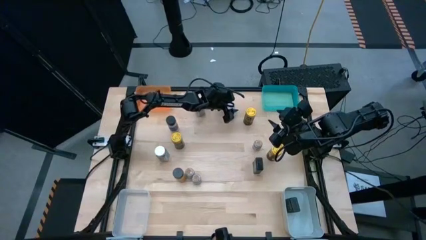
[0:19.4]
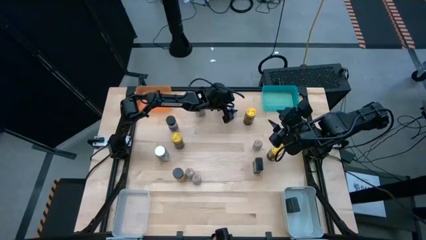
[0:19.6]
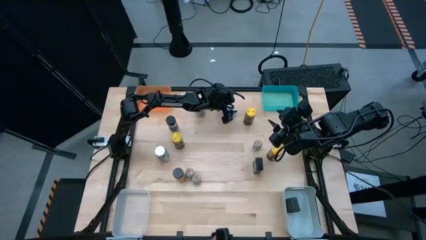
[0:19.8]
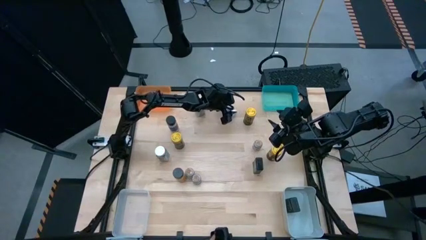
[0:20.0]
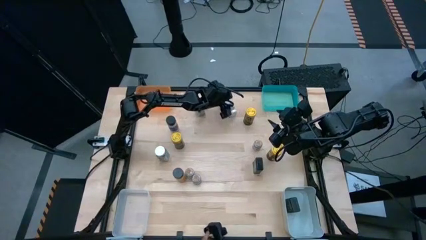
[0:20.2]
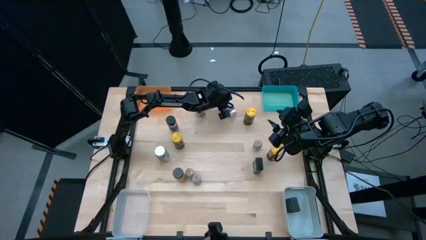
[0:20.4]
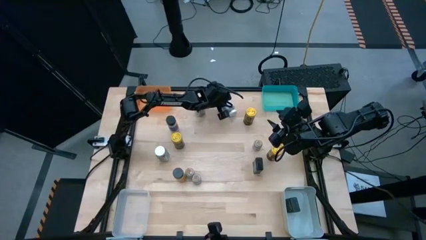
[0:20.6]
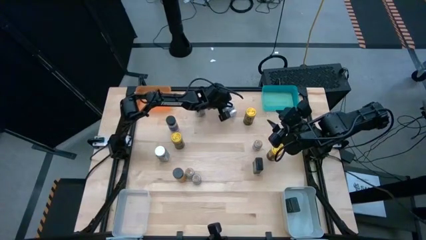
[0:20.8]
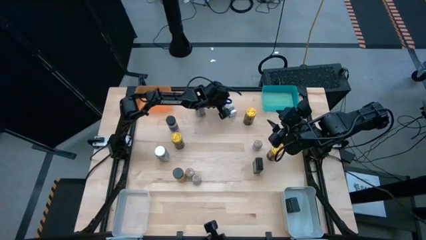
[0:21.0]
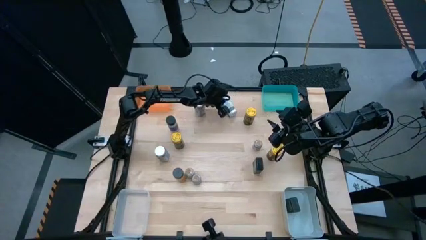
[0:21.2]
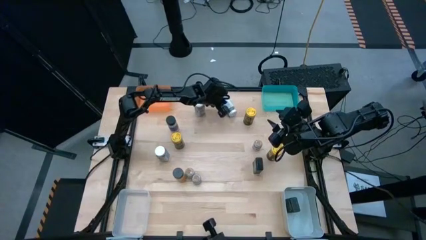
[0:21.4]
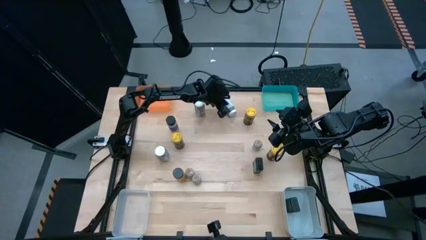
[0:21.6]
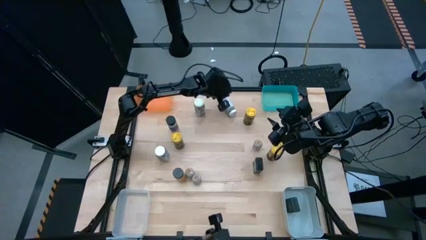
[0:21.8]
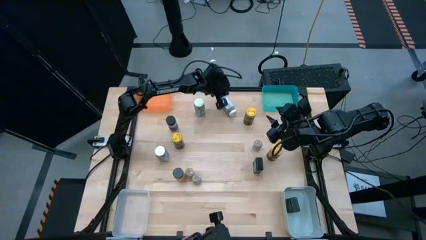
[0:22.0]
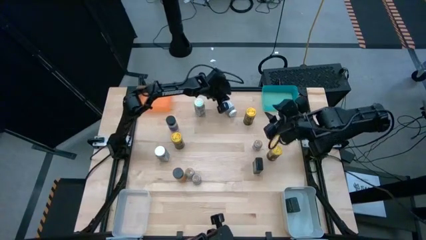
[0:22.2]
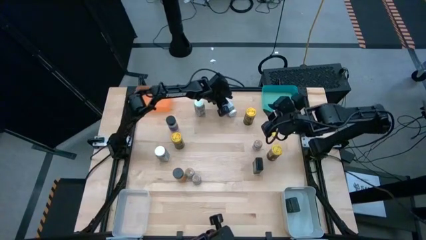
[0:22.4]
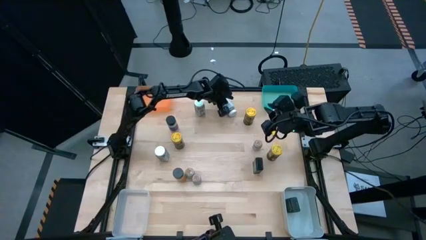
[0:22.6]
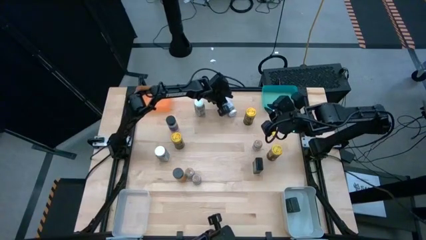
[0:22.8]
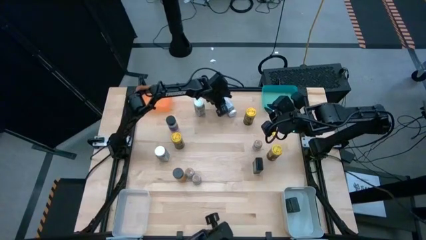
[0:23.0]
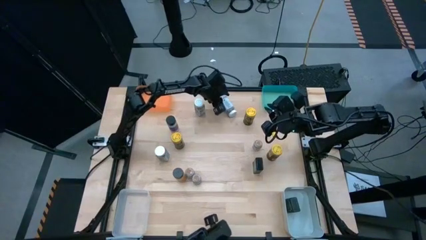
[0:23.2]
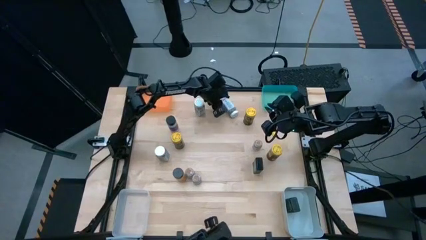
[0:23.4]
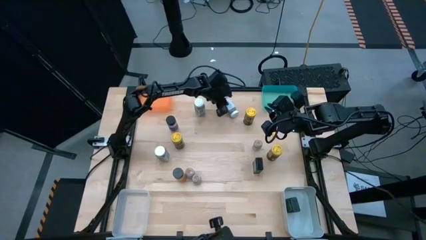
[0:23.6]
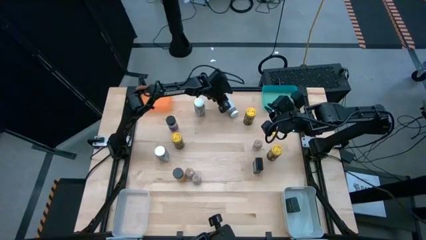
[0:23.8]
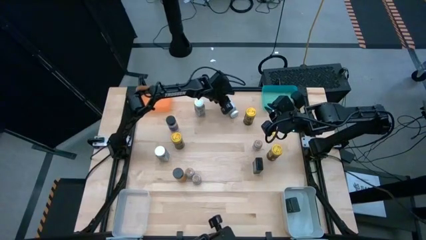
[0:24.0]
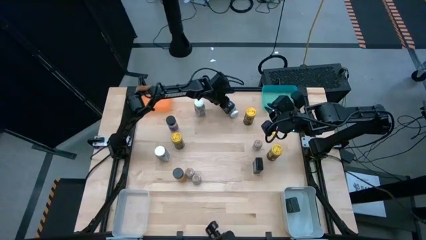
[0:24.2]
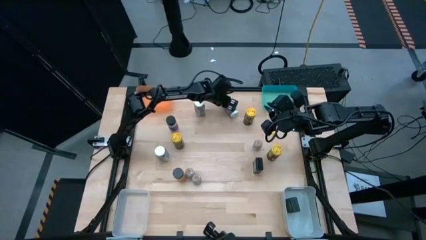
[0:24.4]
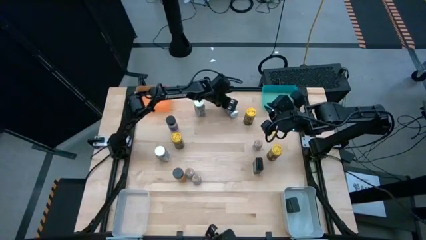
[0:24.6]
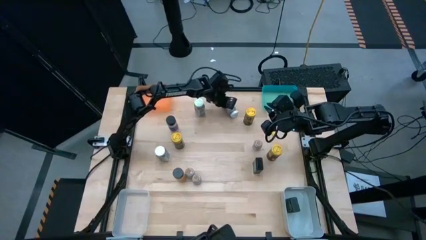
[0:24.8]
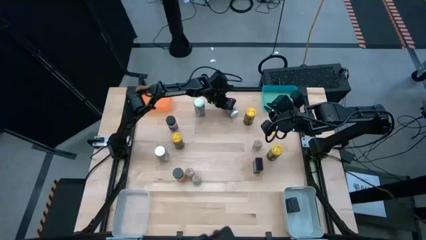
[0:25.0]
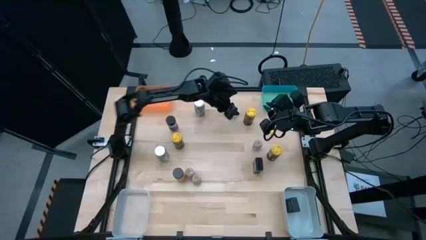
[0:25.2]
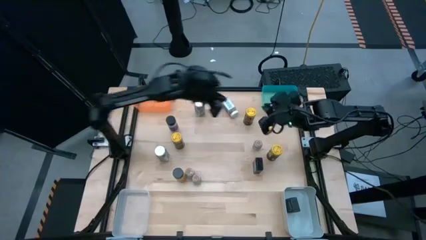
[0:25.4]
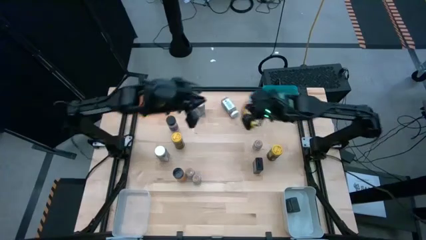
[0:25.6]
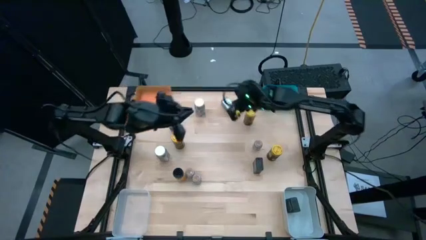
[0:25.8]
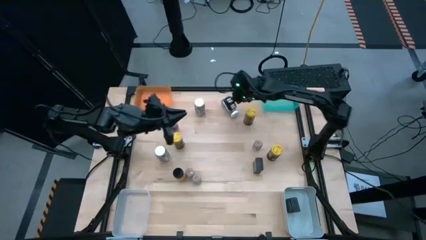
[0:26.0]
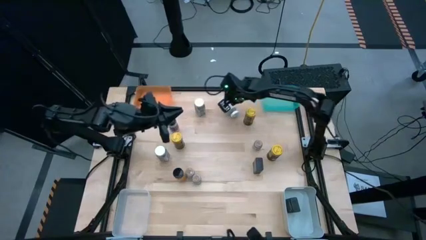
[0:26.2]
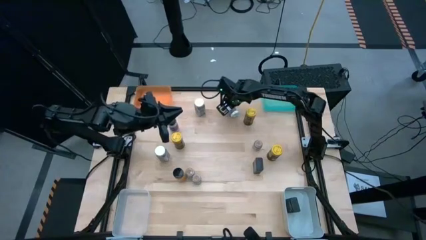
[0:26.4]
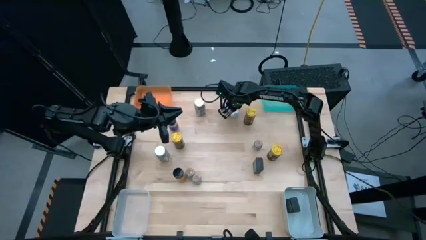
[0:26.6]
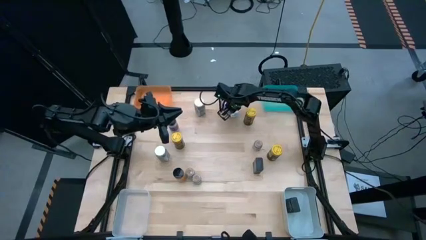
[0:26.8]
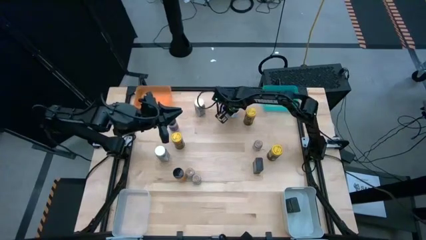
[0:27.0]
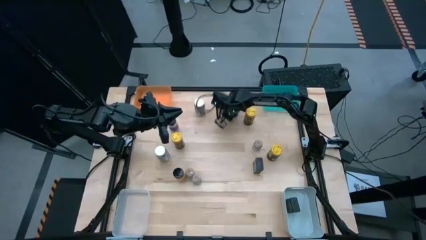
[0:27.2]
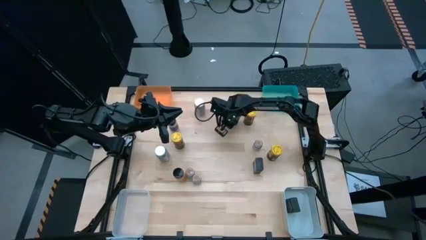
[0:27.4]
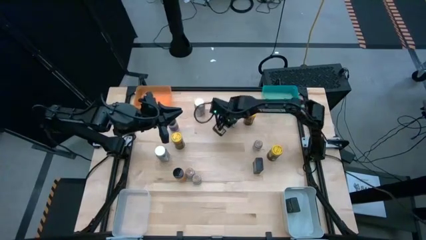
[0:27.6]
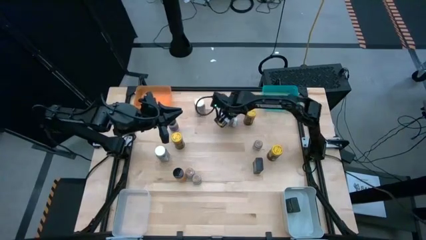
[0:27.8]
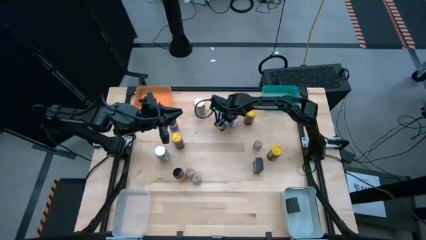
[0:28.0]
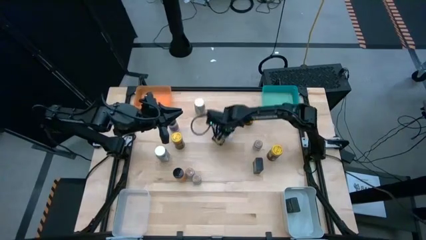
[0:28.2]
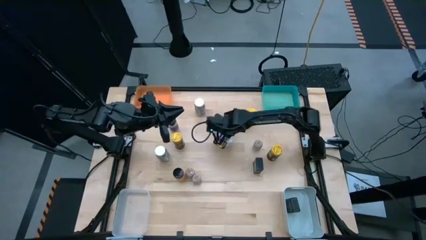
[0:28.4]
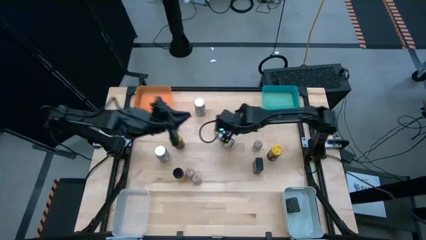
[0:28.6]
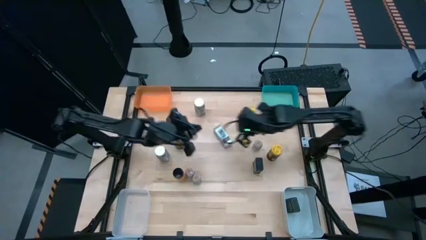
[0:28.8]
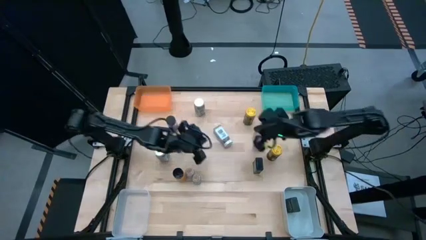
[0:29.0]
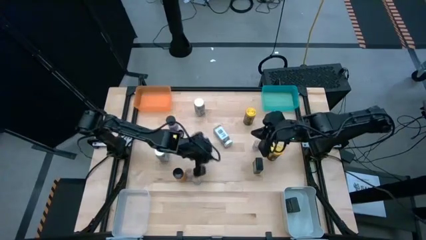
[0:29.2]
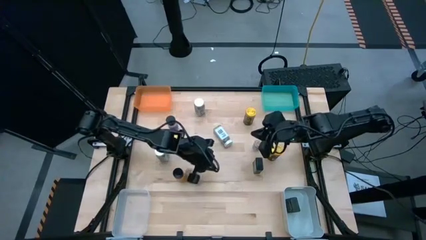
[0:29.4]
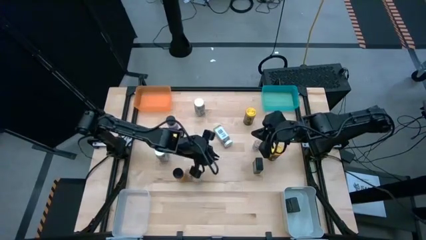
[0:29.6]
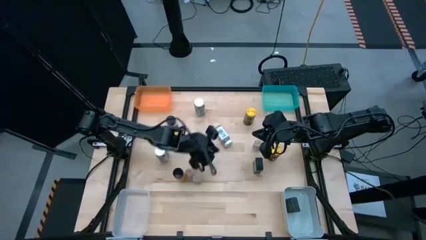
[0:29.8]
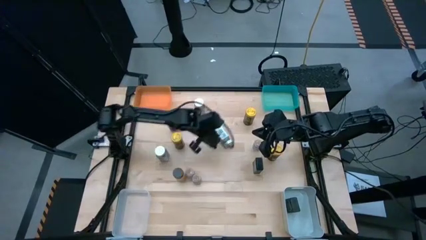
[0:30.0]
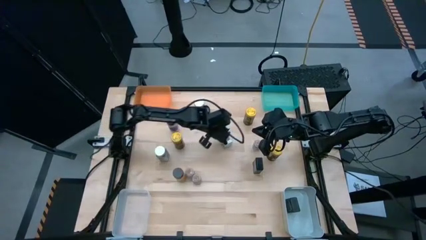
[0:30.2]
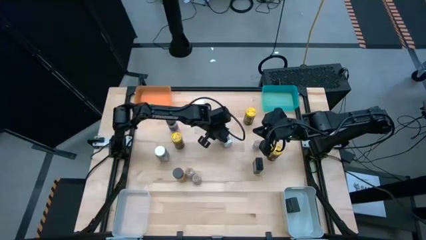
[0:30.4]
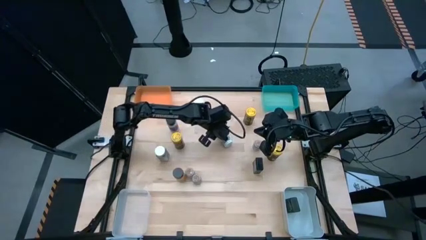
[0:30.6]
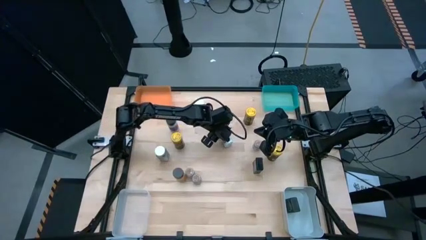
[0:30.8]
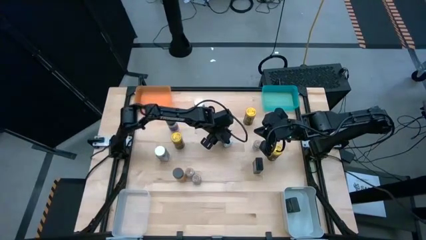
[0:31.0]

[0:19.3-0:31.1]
Task: Sort spices by type
Put the white seasoning bottle into the orange bin
